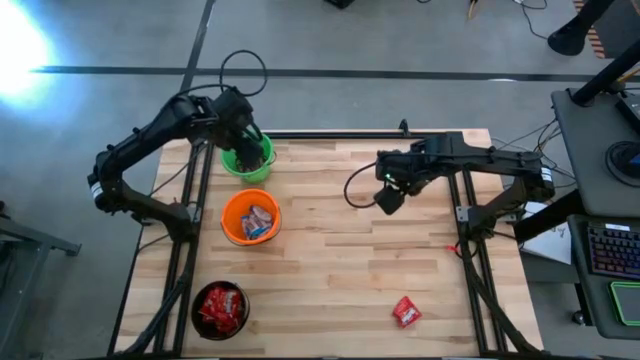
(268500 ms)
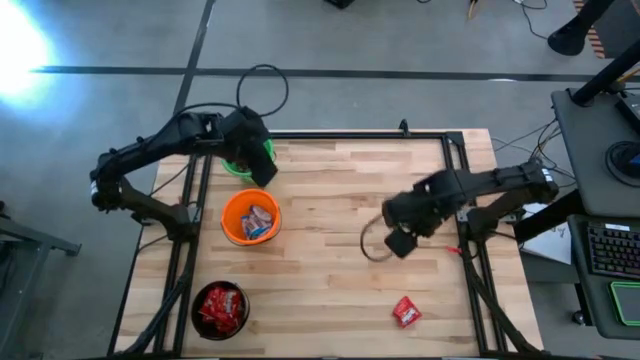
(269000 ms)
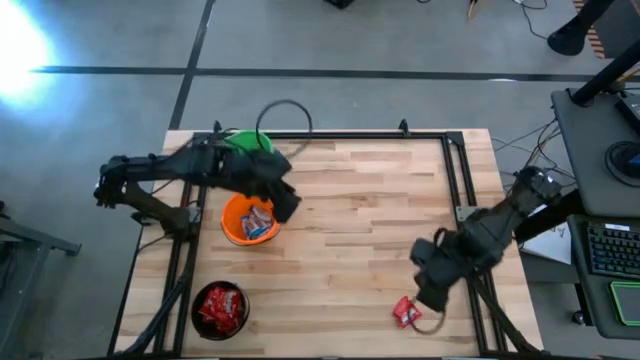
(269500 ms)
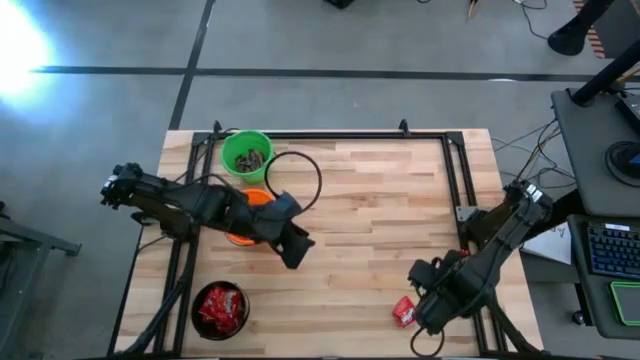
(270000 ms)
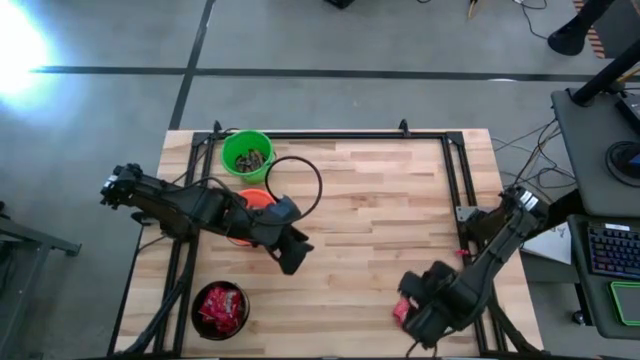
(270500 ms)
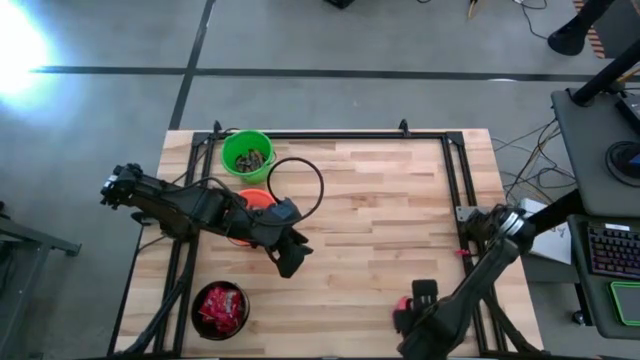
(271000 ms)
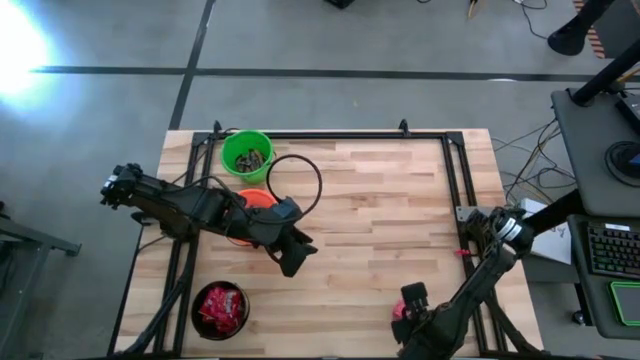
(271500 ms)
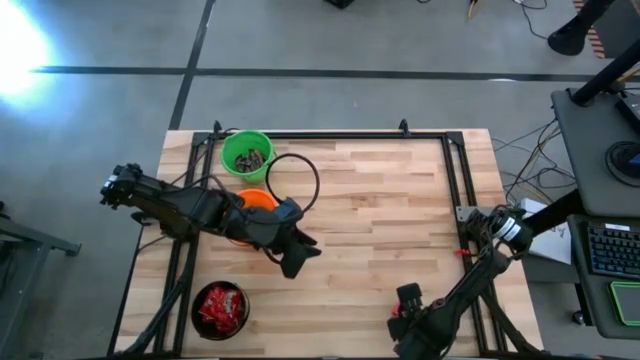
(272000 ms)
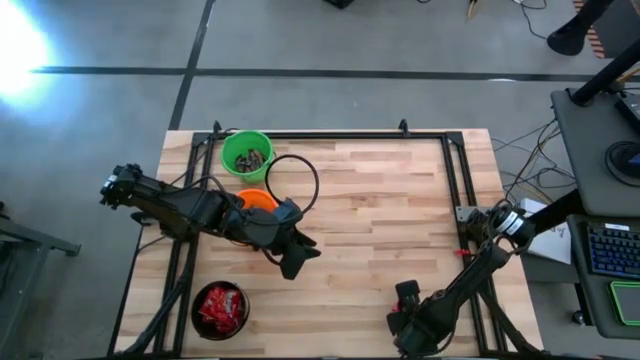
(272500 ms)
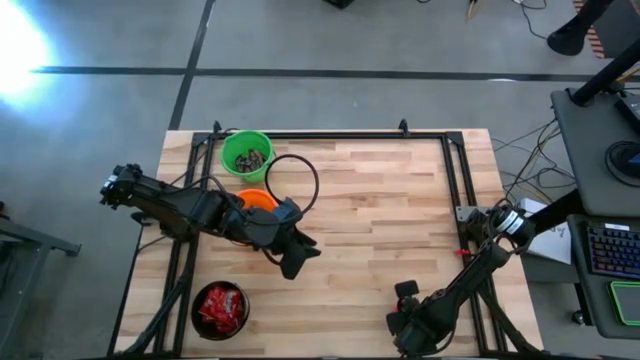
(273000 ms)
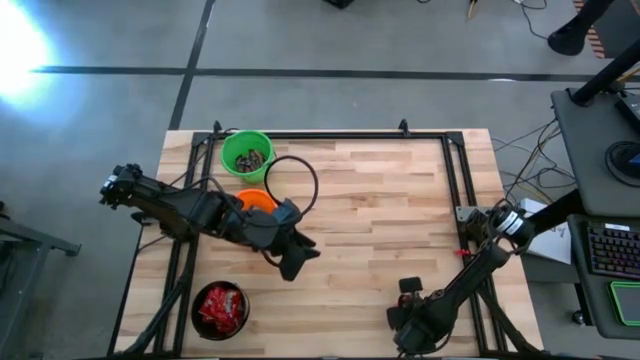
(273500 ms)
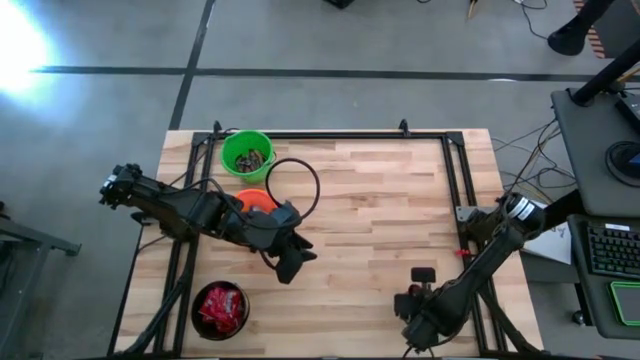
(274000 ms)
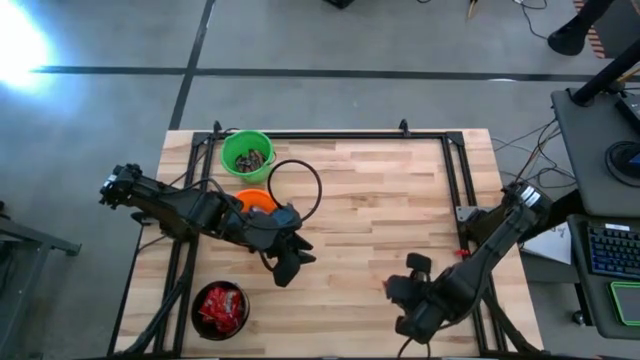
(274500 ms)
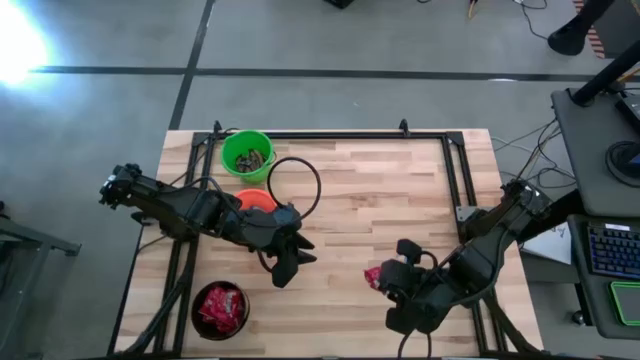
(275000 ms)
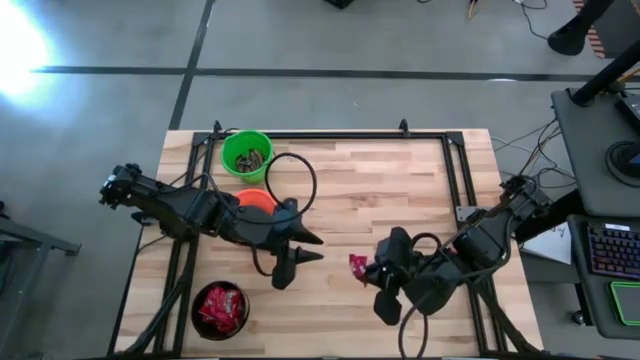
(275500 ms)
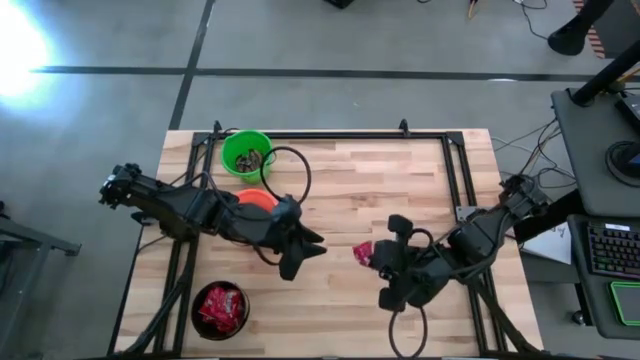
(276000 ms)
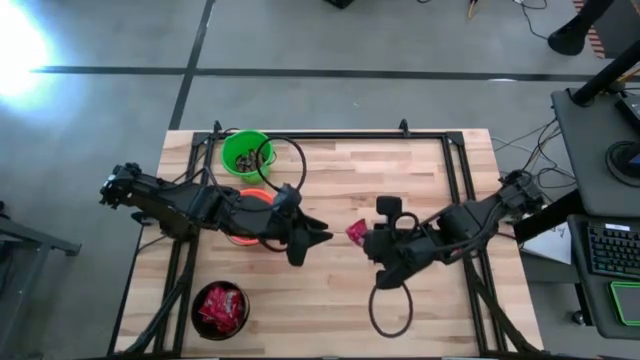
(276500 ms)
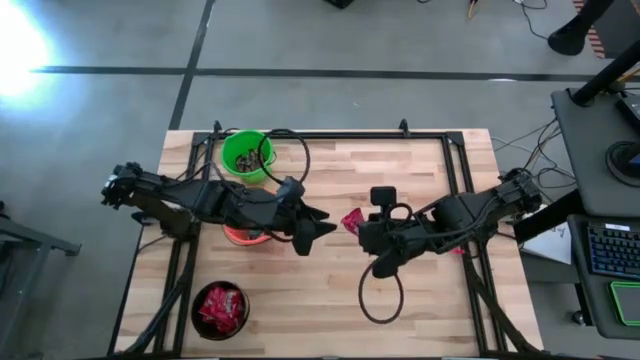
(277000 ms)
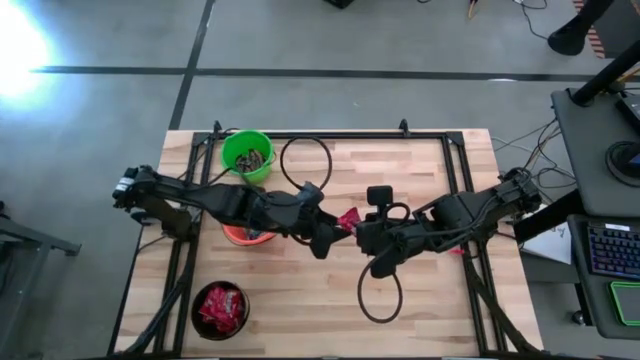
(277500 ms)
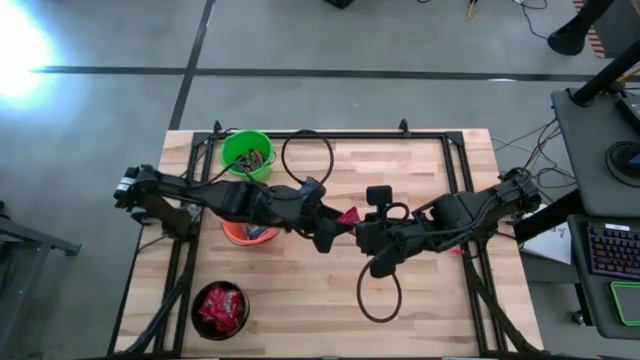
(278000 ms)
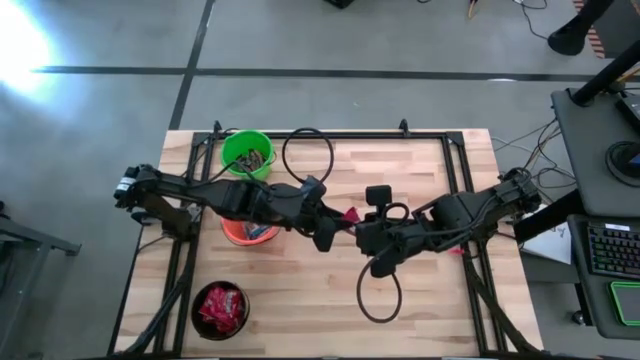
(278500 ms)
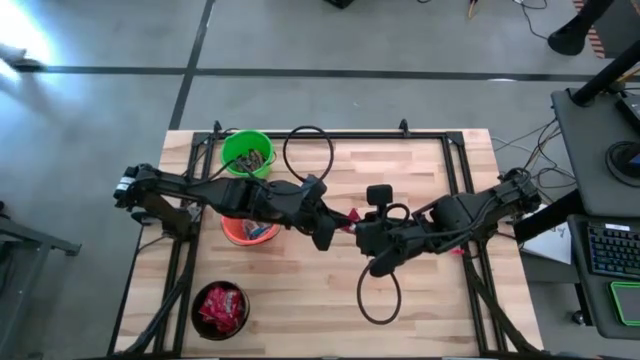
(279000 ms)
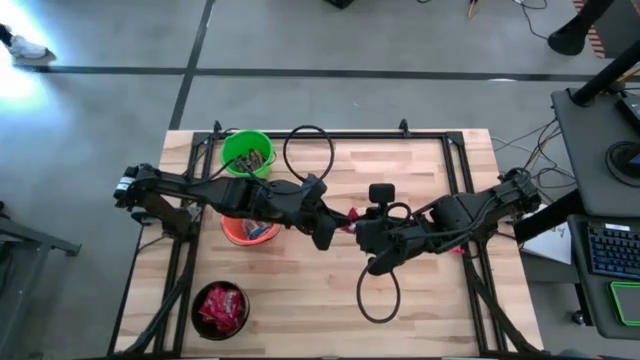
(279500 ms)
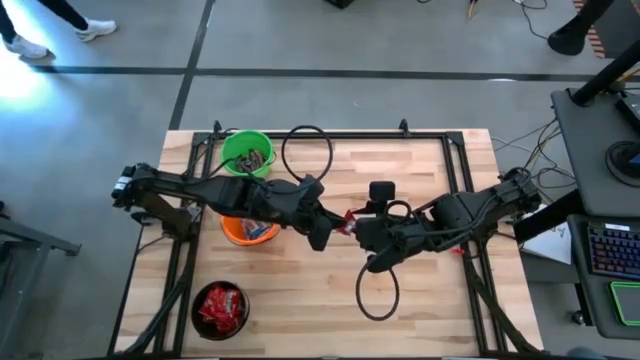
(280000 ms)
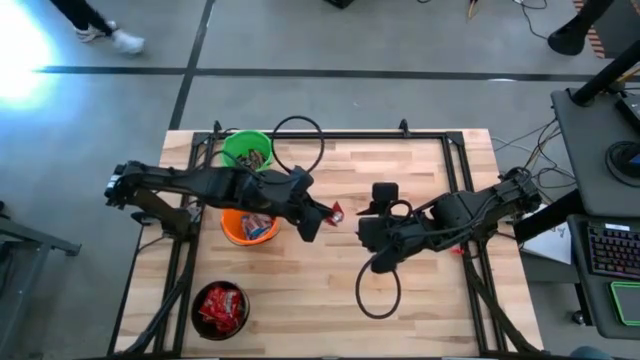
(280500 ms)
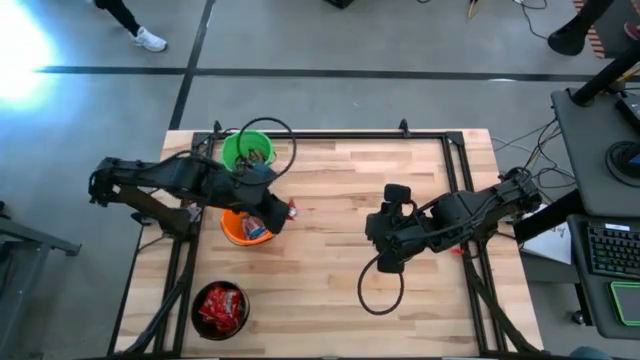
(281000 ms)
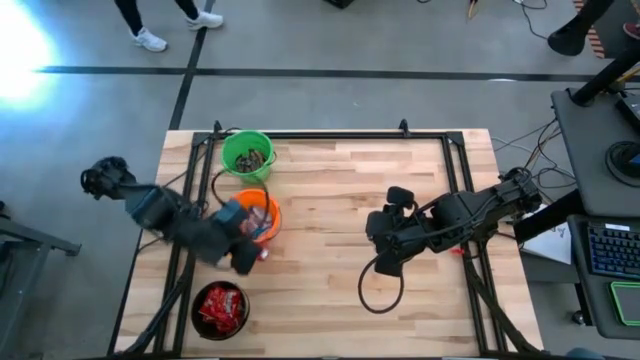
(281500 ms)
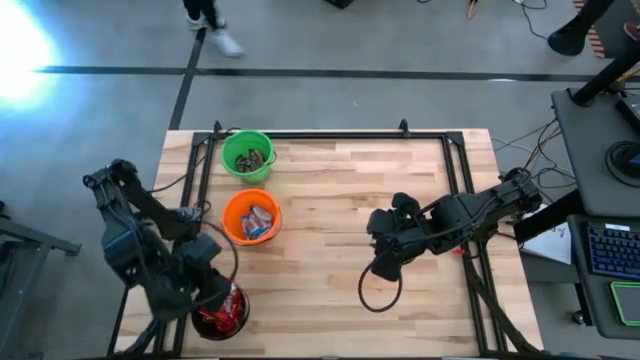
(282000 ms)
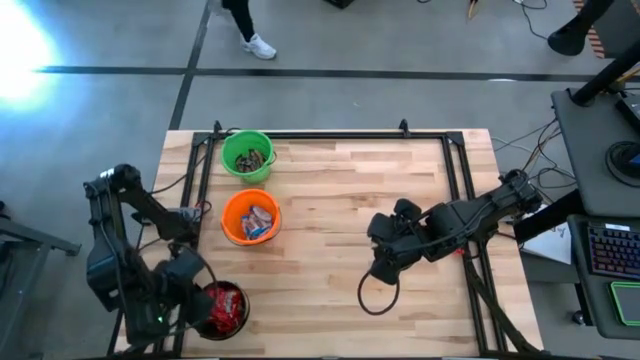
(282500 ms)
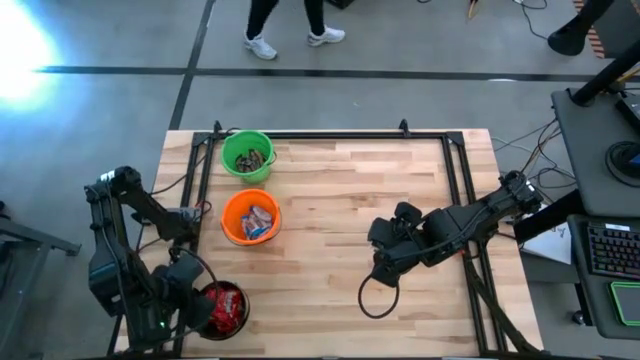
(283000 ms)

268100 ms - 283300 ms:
Task: Organize candy in baskets
Put the red candy into the black bucket

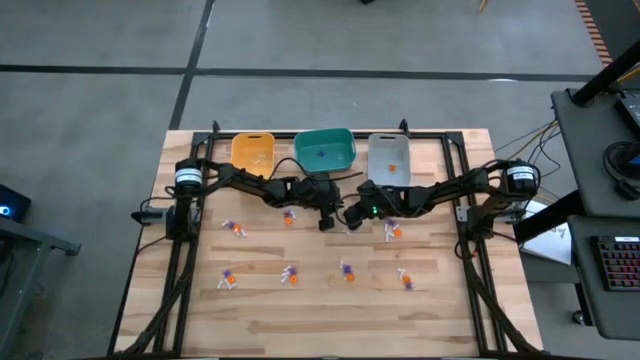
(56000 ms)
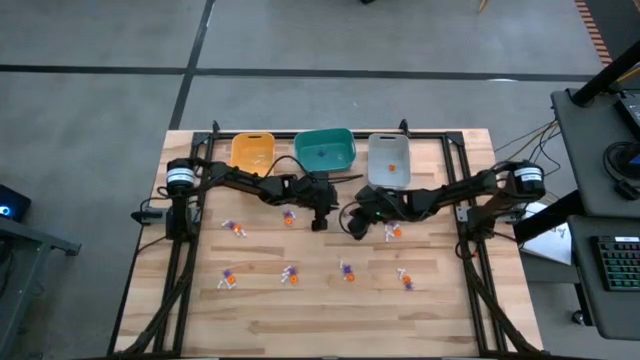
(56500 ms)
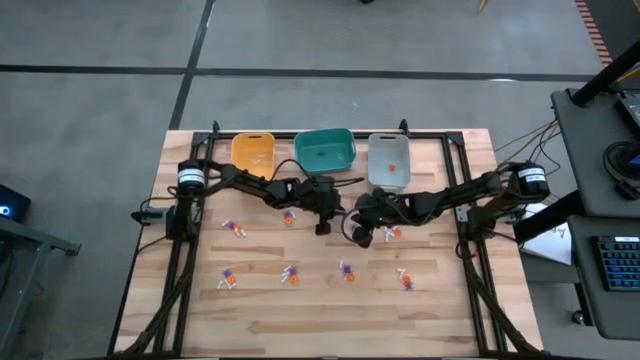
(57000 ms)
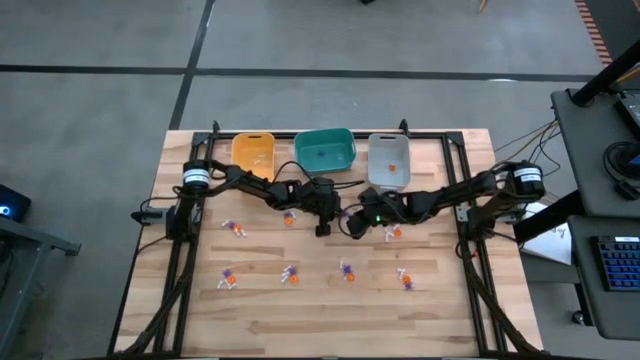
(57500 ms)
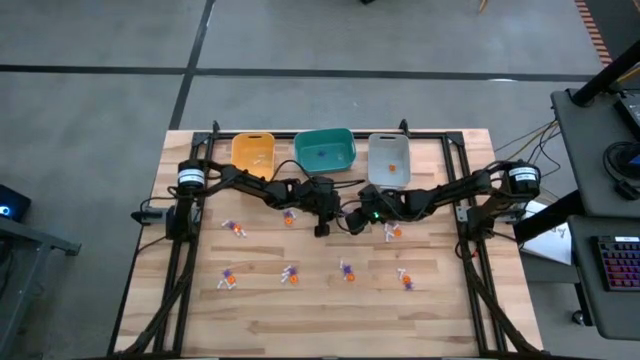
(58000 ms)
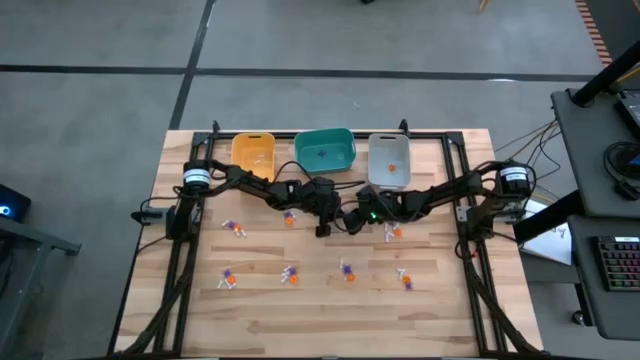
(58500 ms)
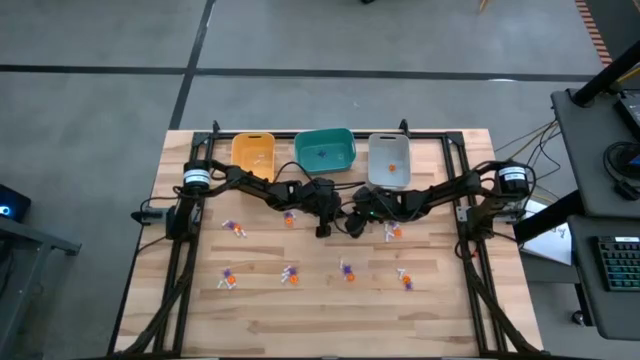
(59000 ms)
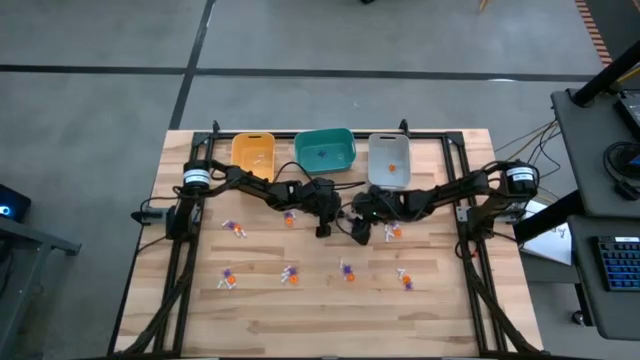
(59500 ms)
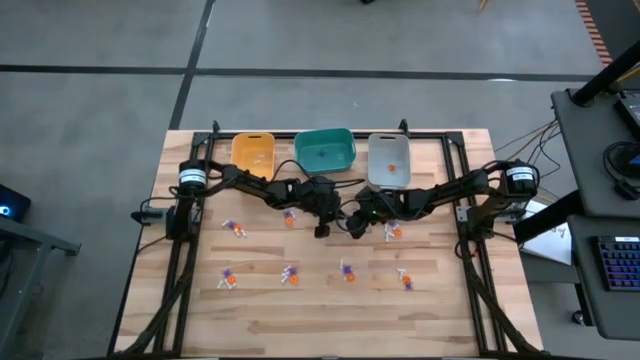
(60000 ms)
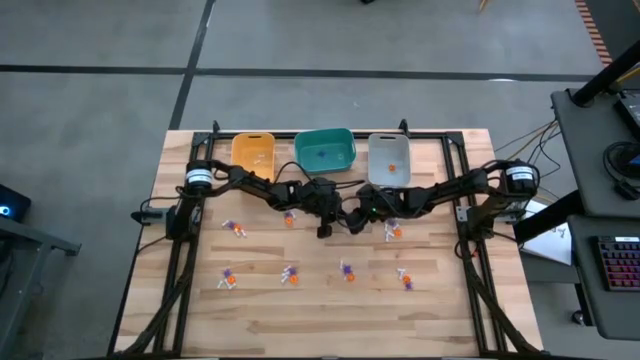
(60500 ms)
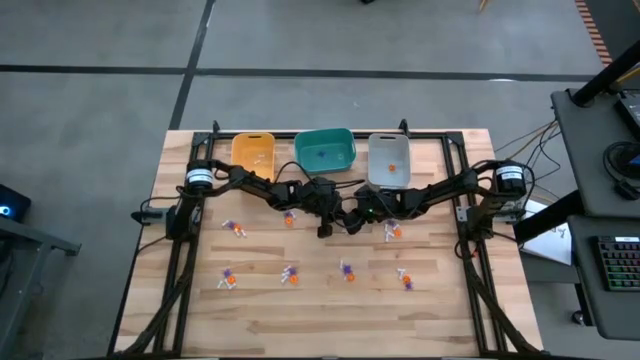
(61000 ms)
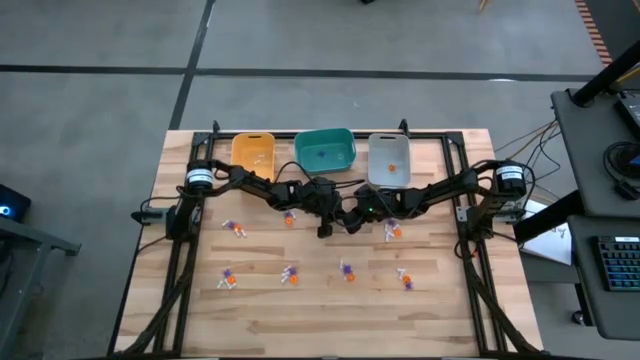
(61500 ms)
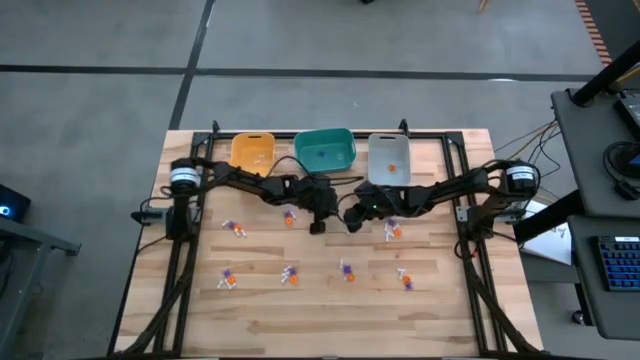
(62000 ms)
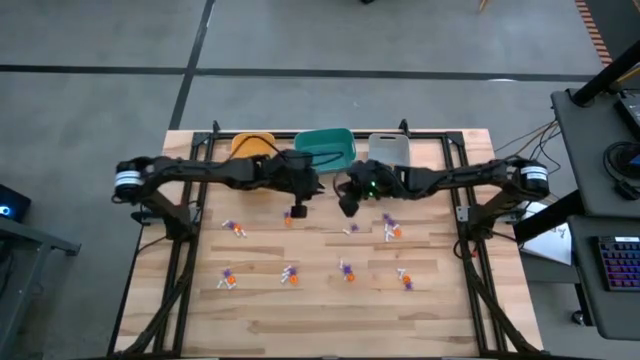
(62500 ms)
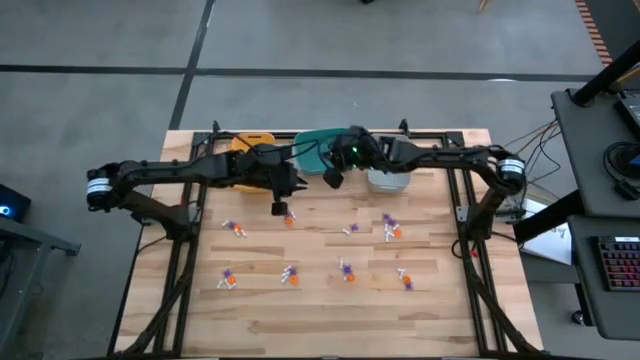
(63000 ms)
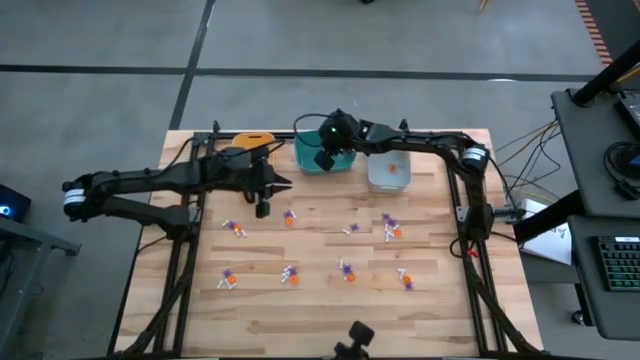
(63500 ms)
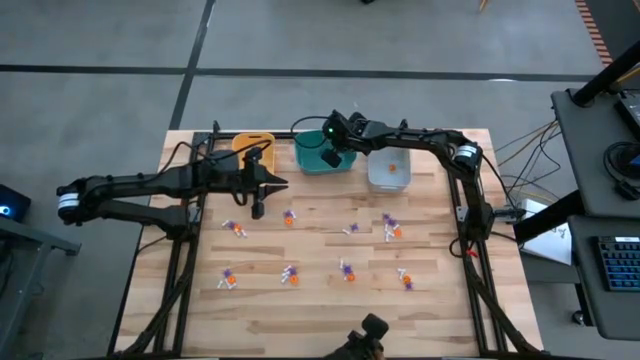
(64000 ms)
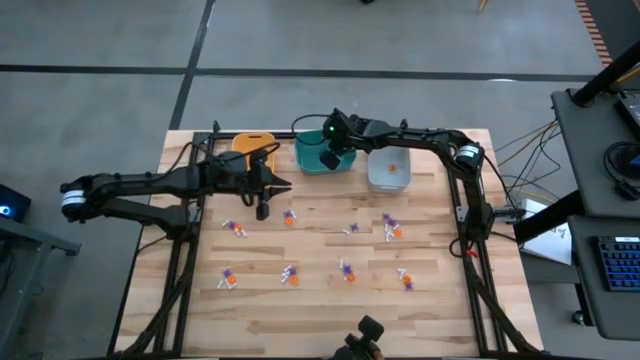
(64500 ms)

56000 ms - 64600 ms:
Task: Sort Halloween decoration
Put the small violet spider toy into the green bin
